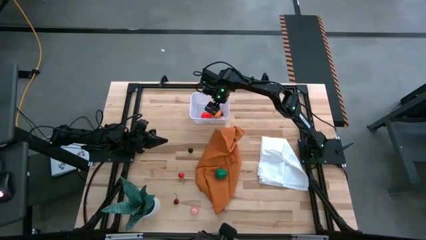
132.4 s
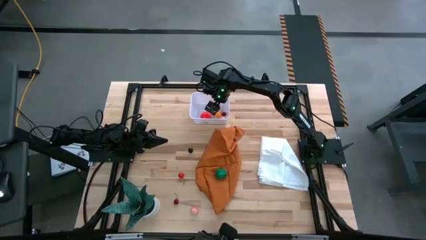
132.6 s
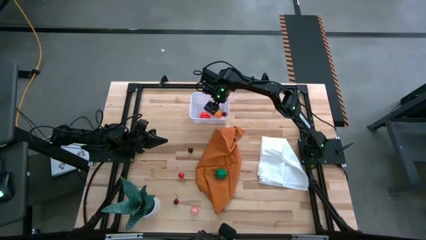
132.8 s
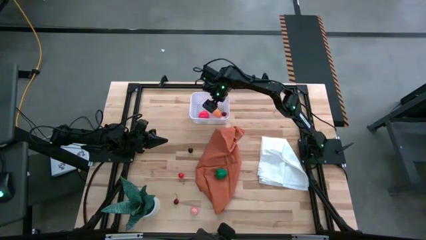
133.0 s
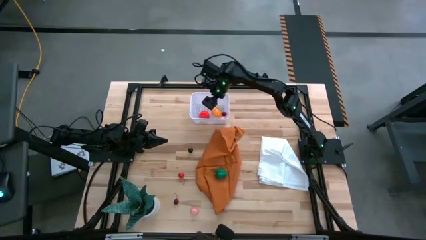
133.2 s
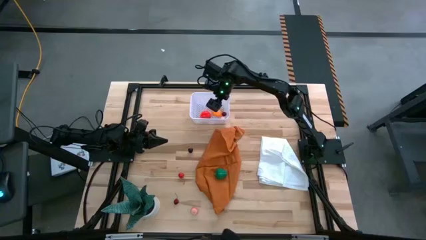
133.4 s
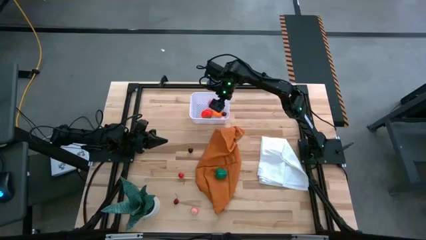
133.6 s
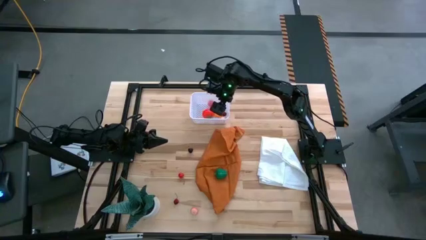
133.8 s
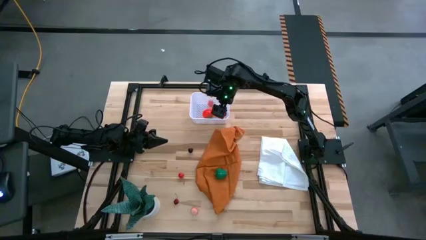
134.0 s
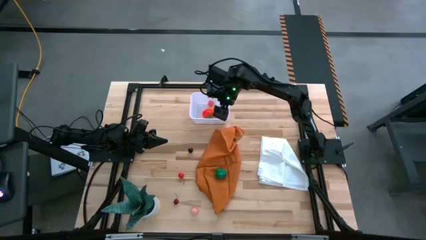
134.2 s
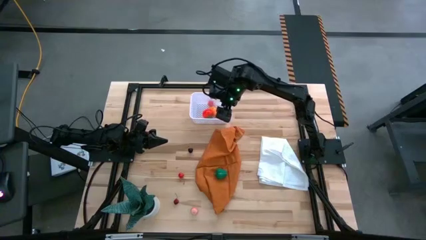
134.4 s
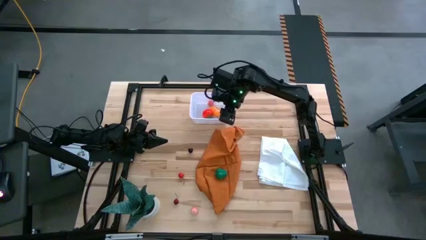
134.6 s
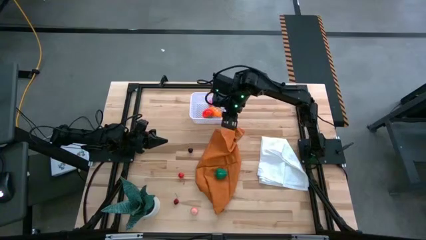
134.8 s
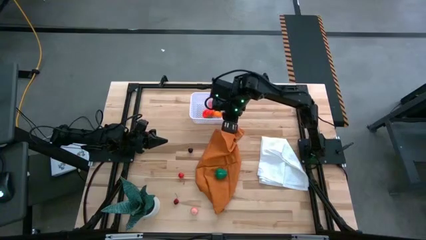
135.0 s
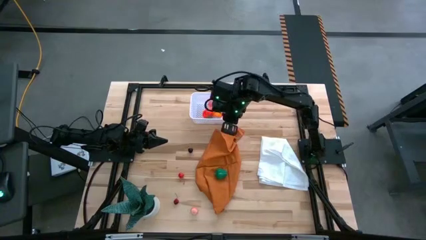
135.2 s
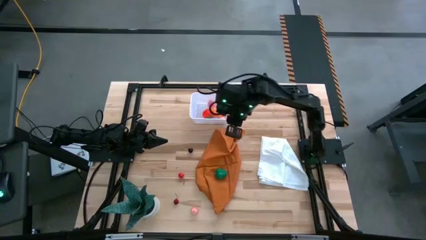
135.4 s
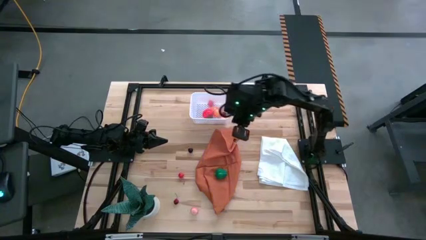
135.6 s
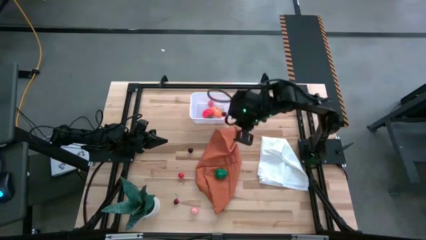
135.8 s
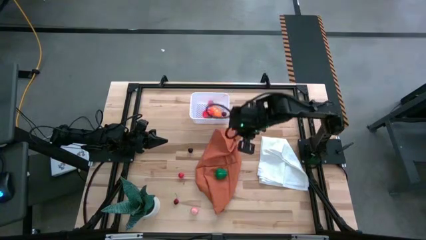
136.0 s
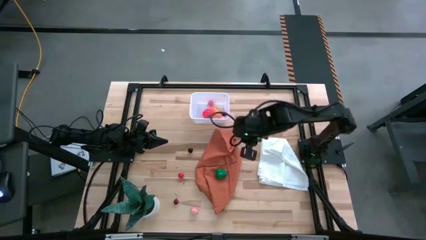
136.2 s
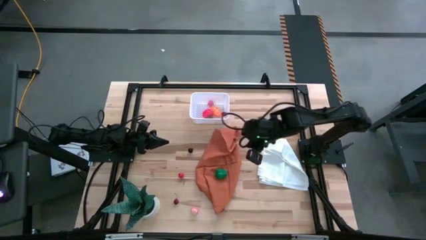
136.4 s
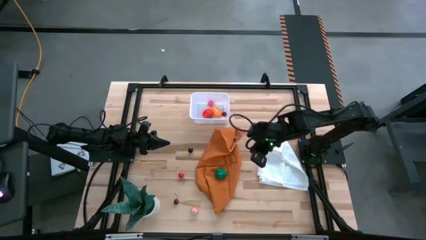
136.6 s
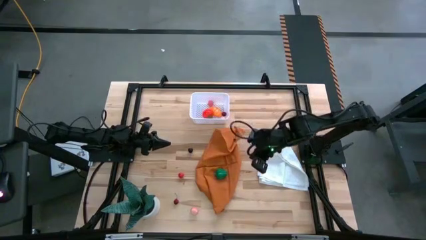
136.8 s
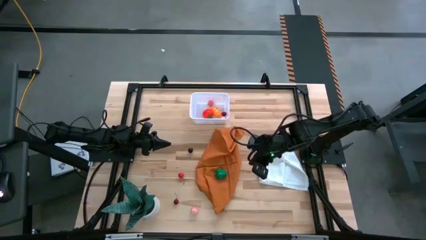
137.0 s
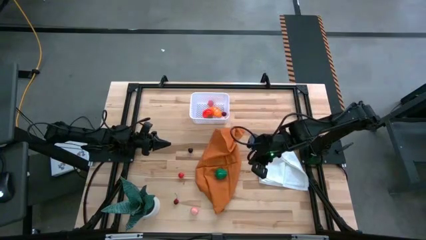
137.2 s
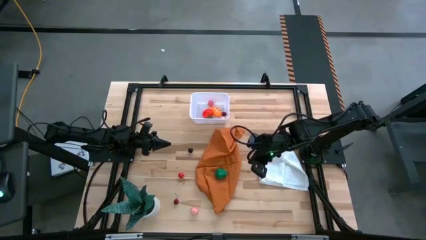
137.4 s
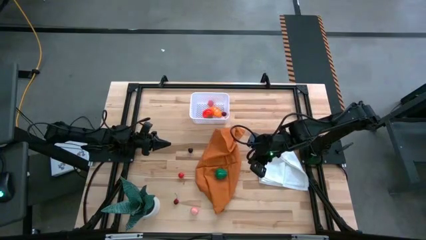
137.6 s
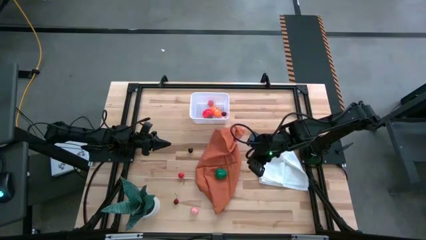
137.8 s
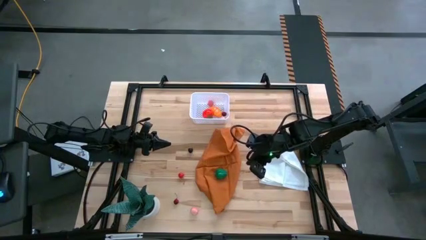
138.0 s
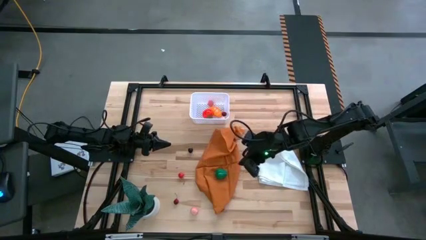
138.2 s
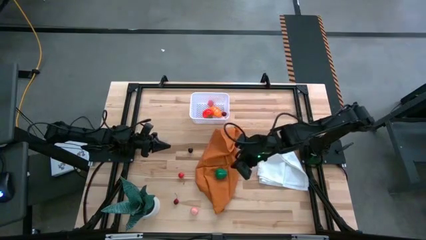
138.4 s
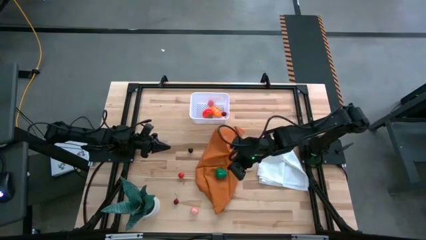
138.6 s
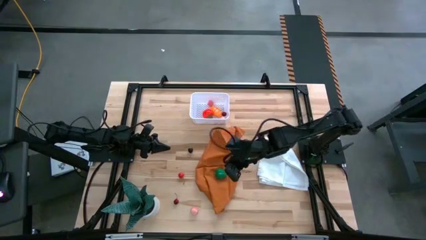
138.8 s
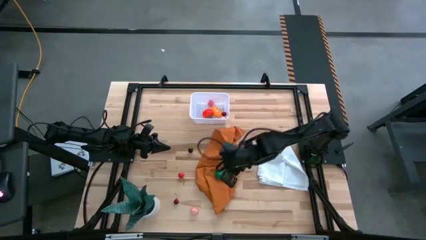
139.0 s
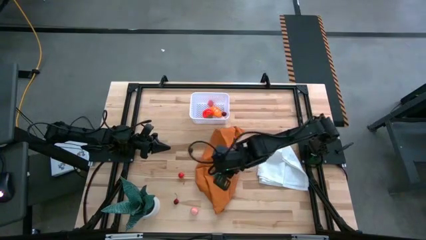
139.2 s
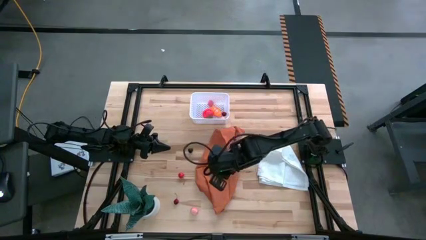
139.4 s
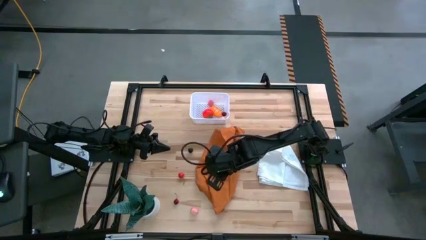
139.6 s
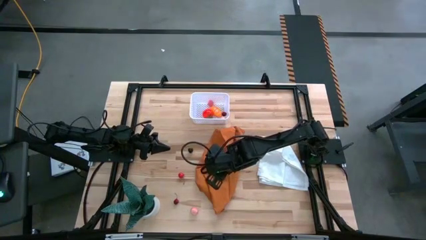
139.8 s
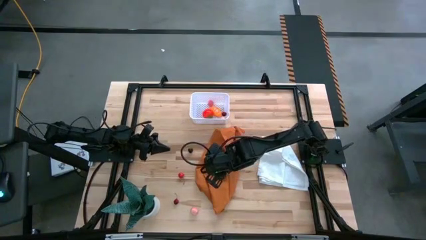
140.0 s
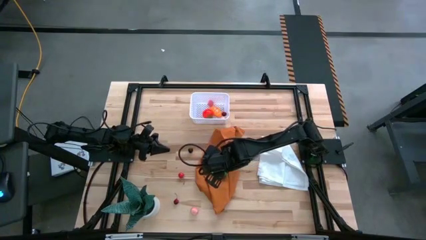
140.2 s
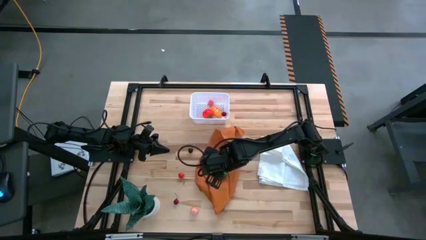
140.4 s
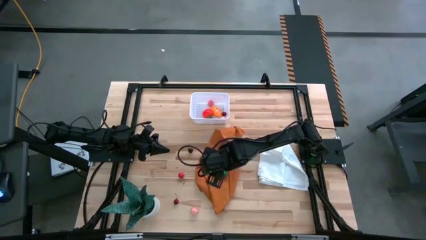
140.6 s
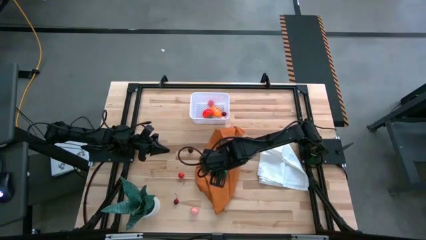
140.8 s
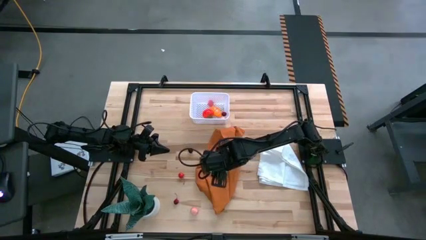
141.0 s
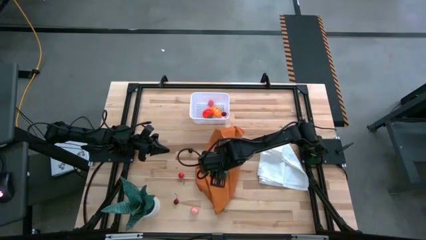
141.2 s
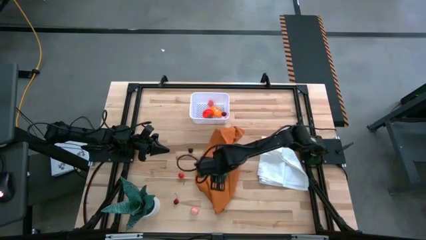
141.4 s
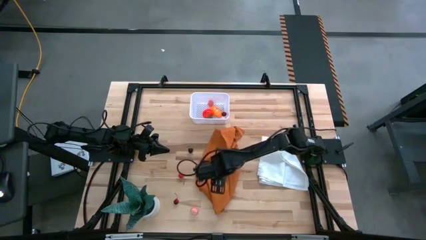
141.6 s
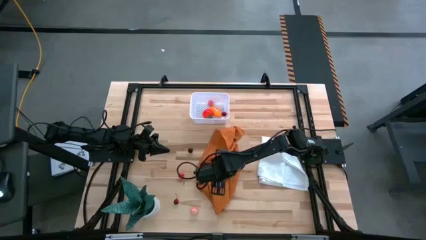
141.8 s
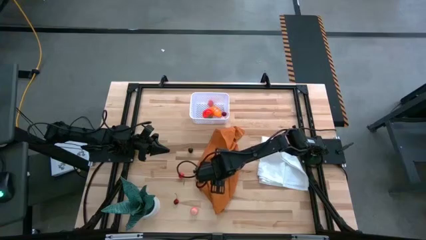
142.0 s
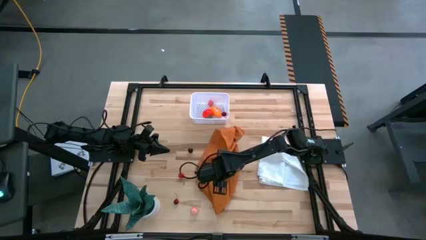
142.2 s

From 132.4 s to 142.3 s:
Task: Pick and placing Produce into tupperware
Put the green bell pepper into the white basket
